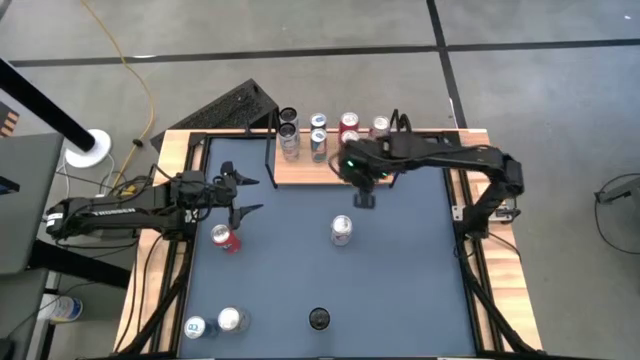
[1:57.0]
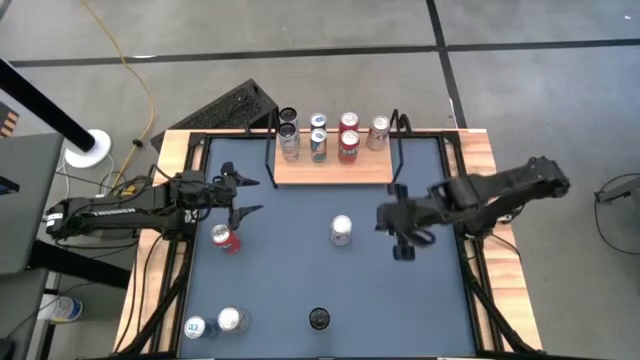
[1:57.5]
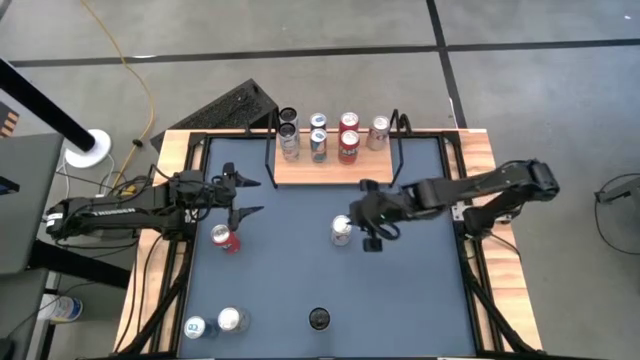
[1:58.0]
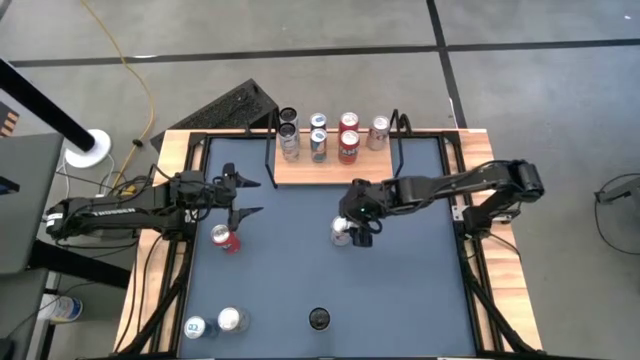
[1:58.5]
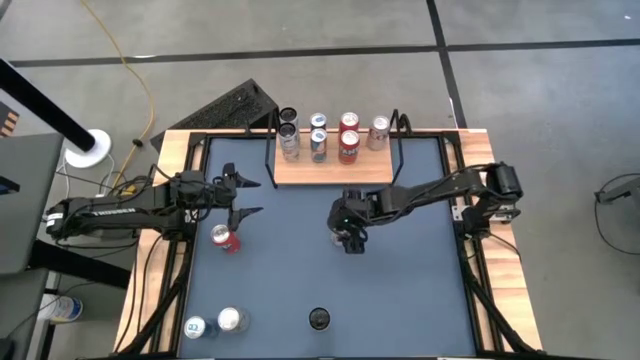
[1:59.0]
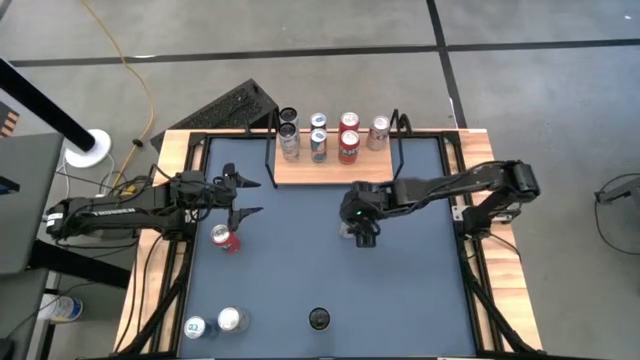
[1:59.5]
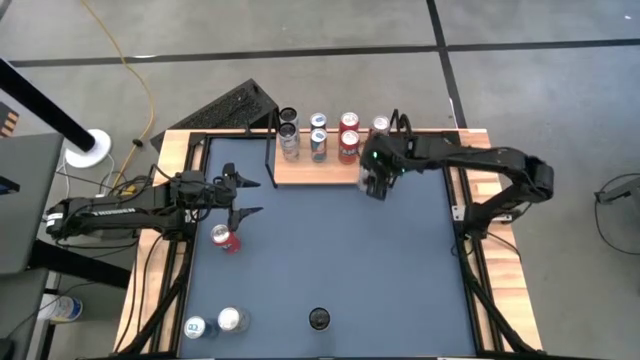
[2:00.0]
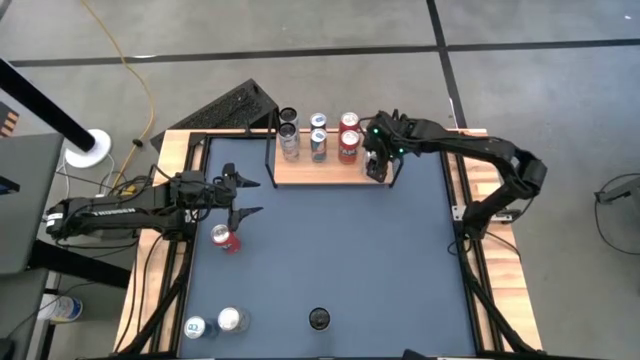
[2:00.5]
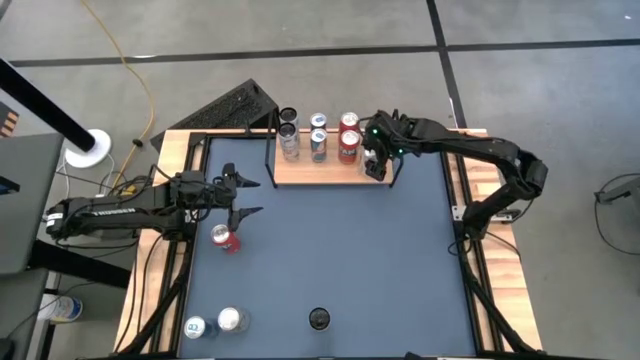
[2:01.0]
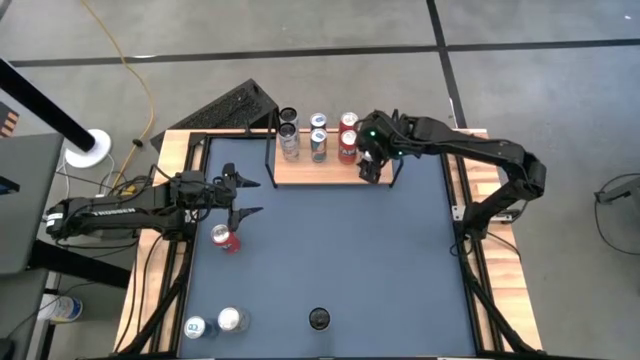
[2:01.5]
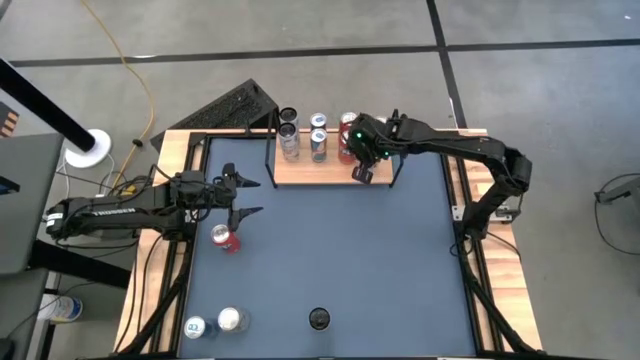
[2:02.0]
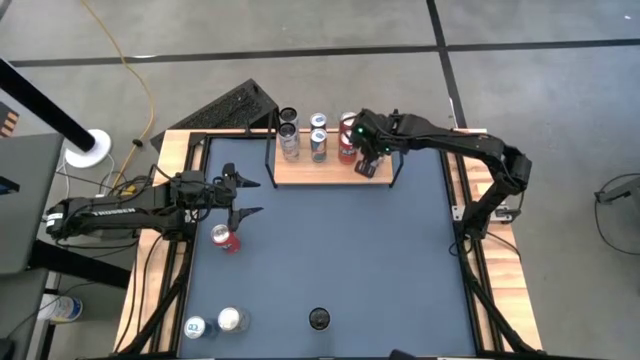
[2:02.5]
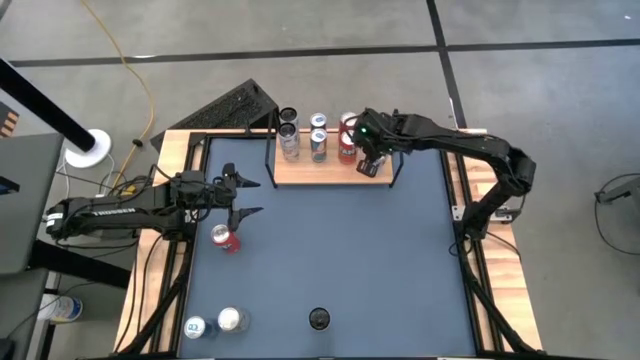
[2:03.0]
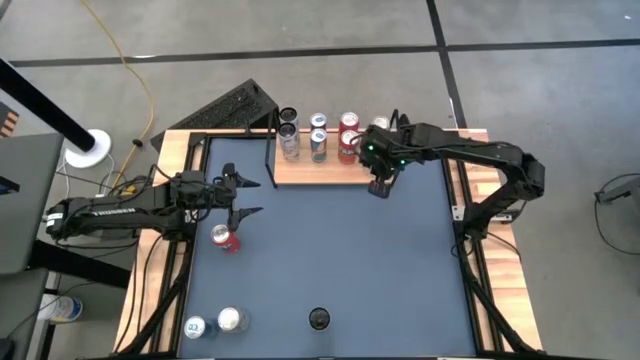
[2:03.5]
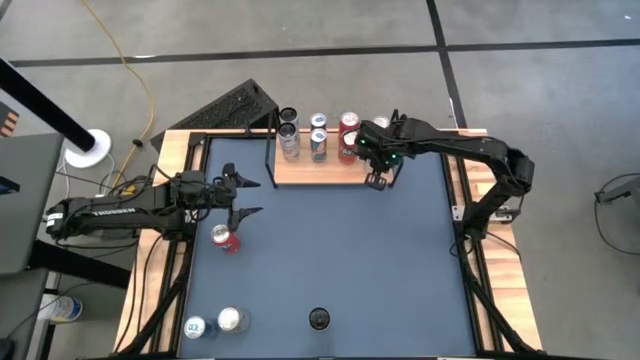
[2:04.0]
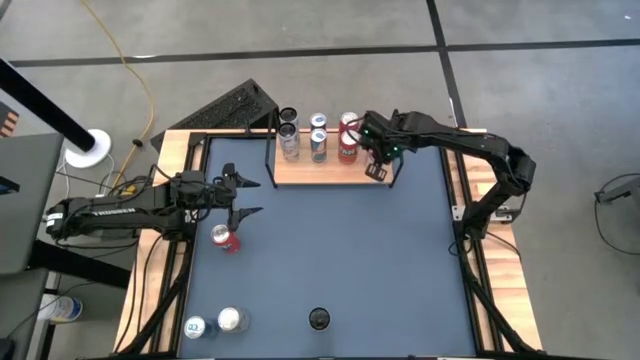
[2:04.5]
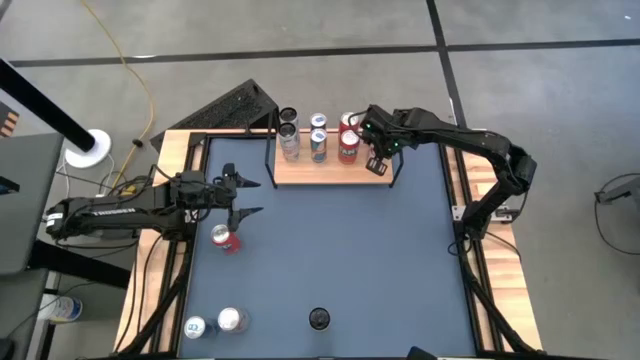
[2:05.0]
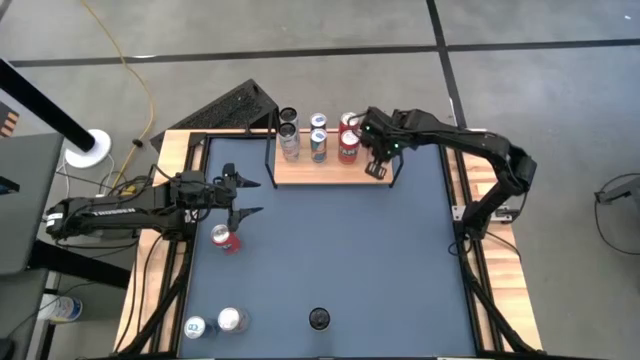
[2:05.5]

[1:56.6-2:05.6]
Task: Place canned beverage on shelf
Put the top silver soda can on the shelf aligned with the other silver soda can

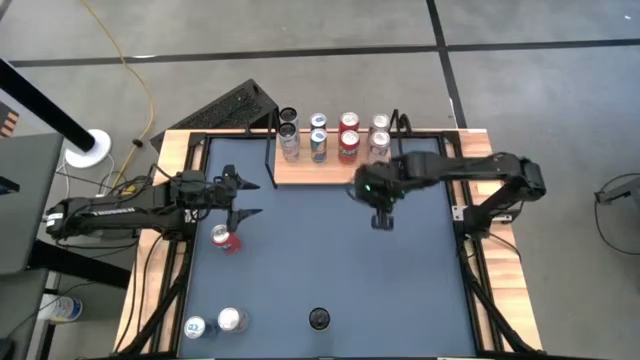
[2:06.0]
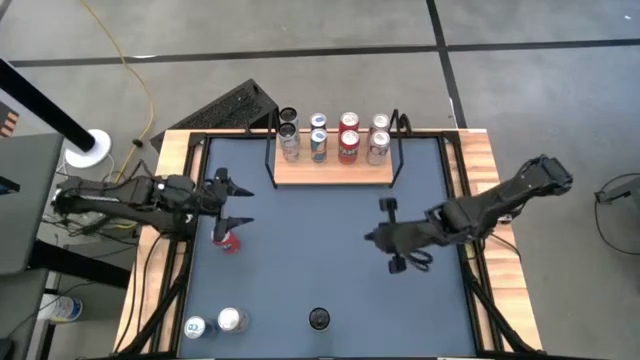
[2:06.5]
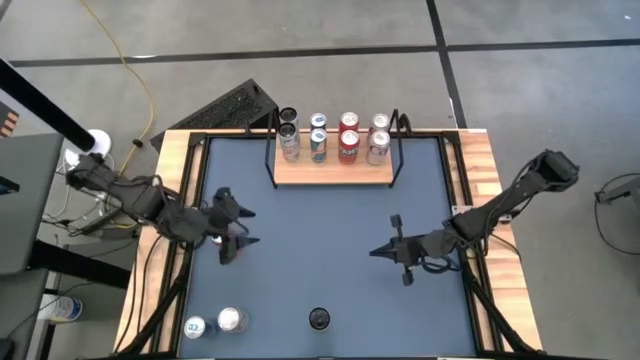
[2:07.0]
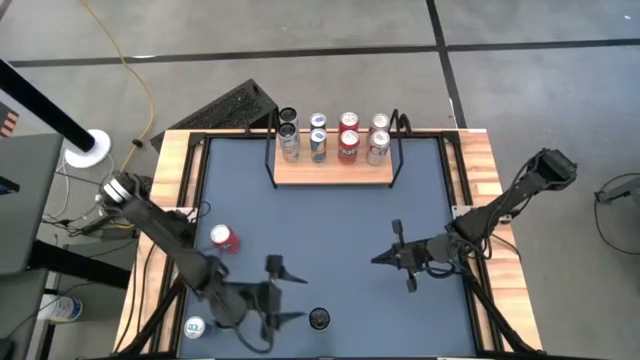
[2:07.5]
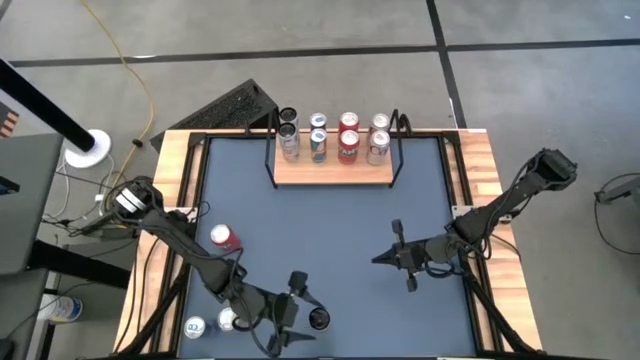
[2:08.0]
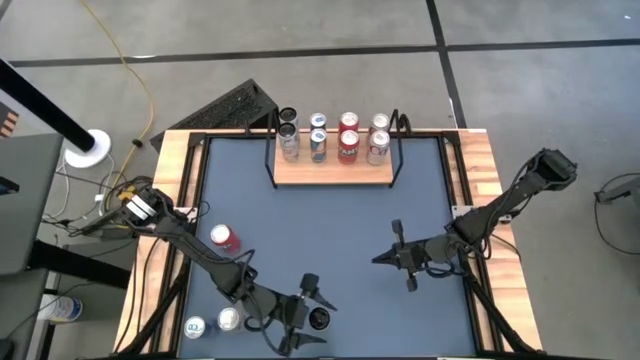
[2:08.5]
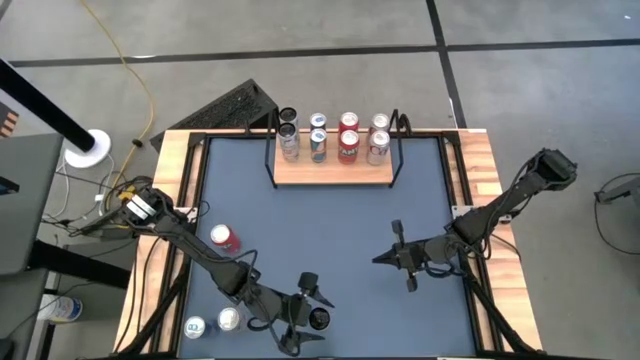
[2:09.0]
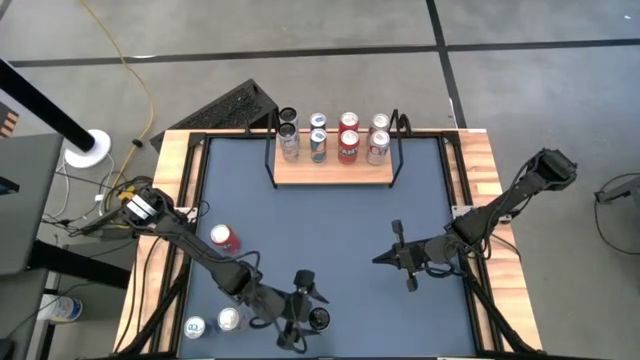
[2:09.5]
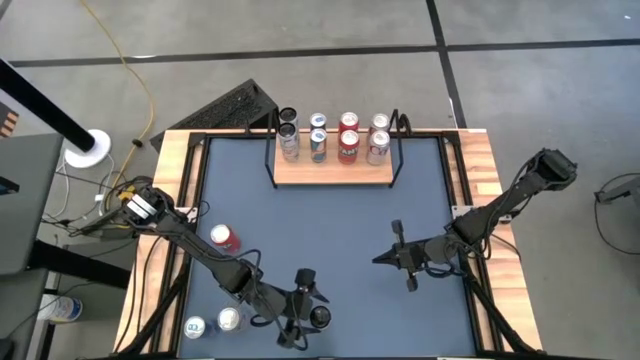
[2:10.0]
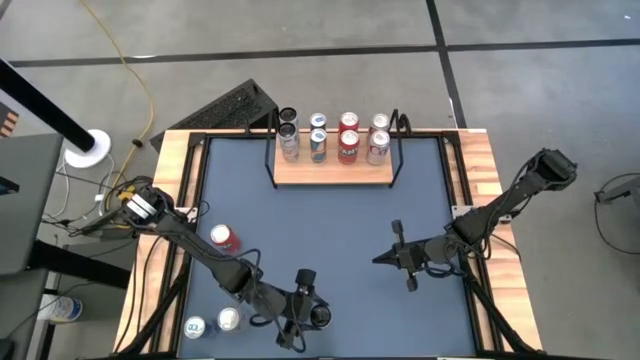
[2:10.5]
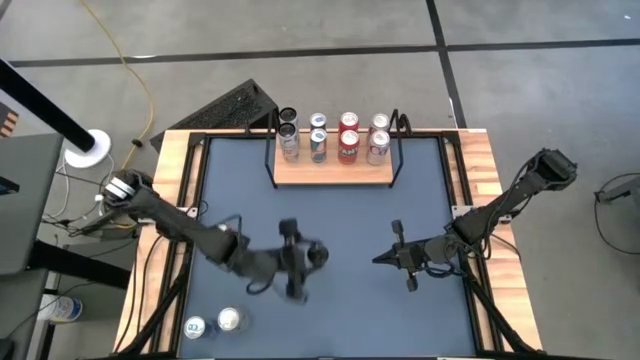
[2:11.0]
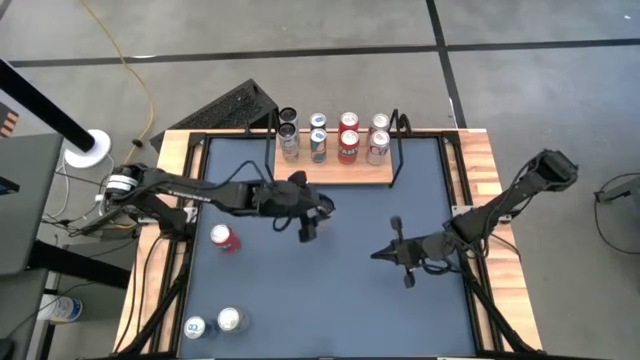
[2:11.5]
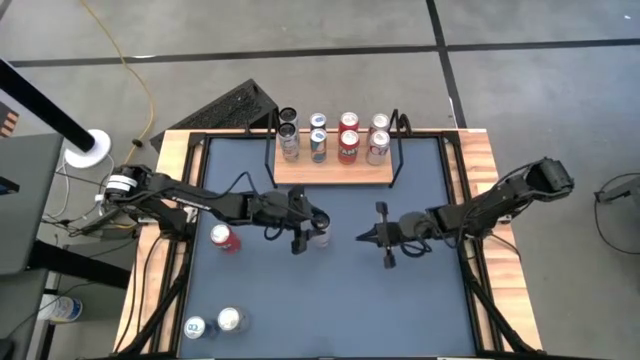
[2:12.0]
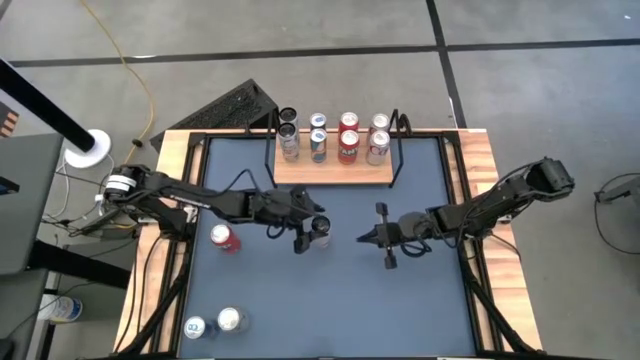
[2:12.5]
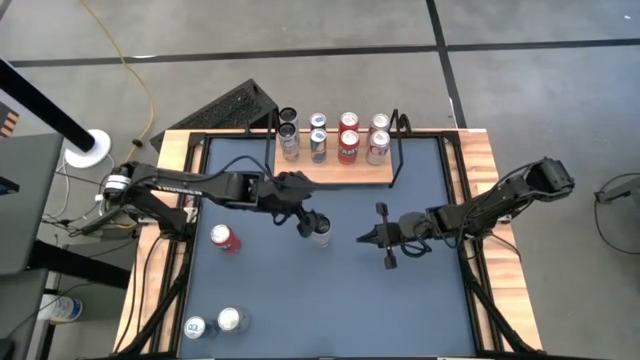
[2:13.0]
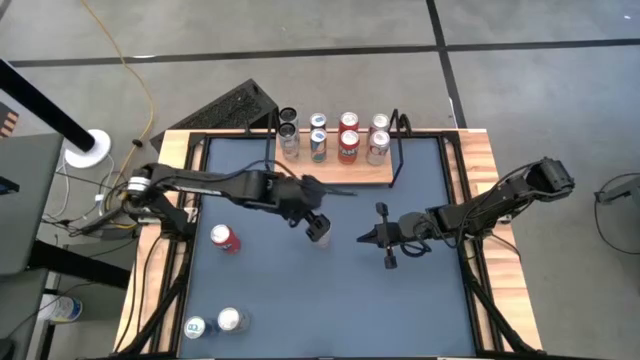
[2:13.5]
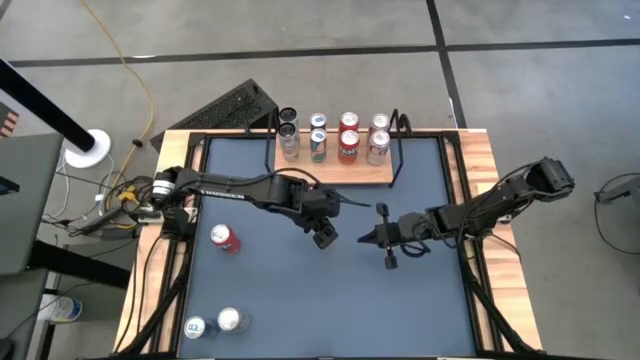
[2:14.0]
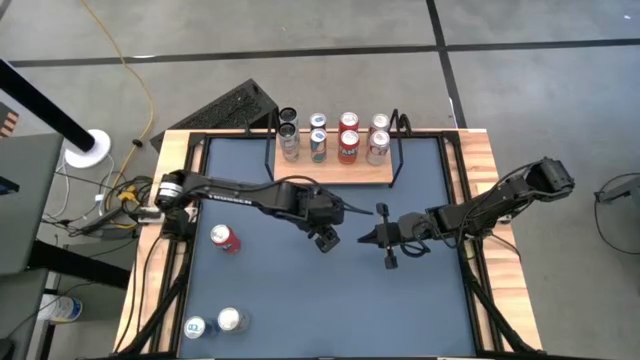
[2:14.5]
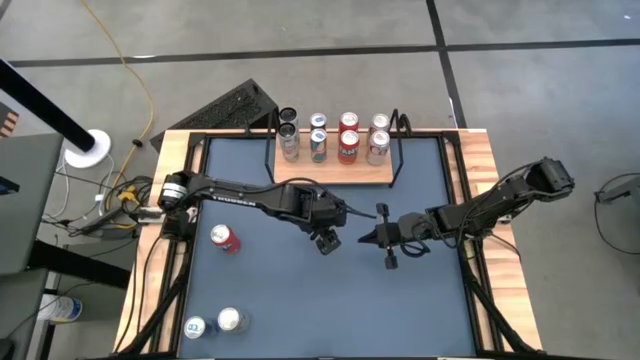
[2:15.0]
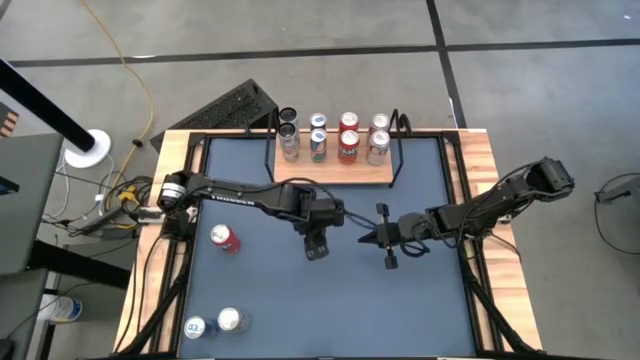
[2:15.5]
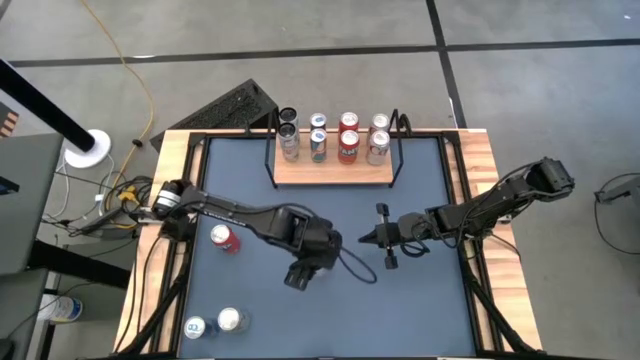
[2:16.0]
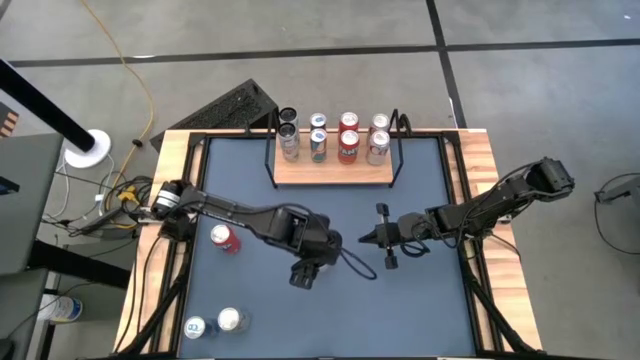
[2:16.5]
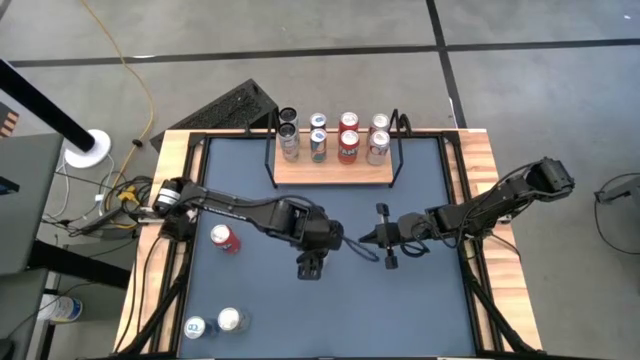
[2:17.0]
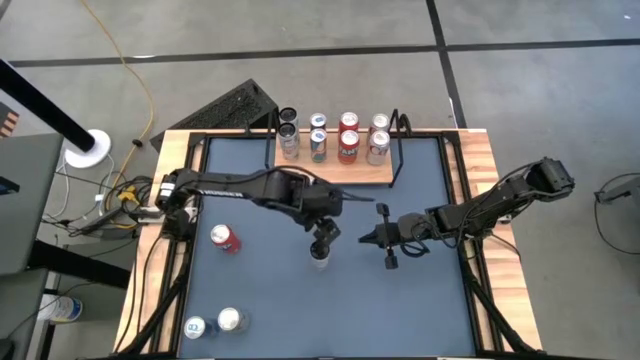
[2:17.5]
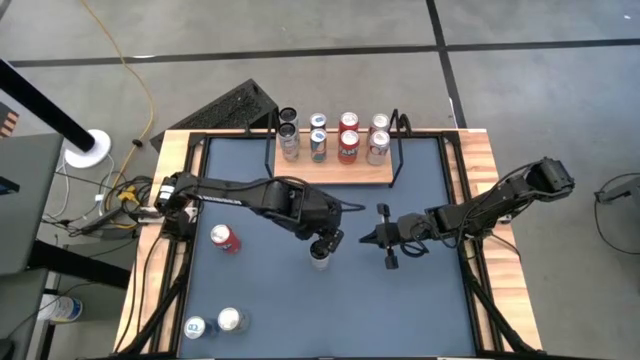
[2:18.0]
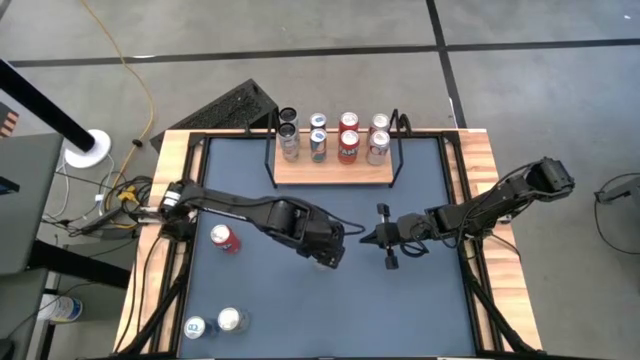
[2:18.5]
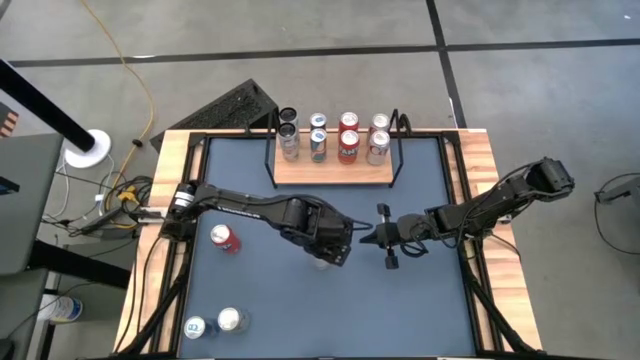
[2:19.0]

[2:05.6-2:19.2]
Put the white soda can on the shelf aligned with the other white soda can
